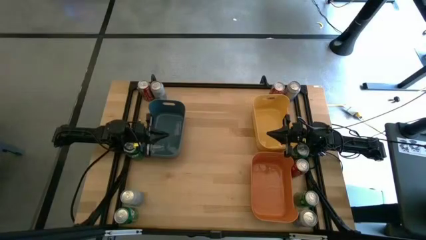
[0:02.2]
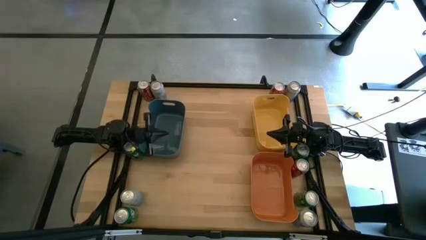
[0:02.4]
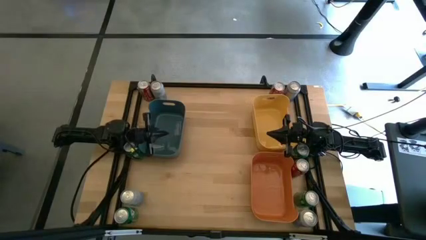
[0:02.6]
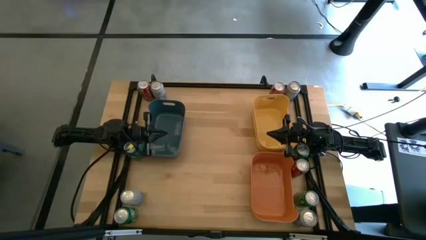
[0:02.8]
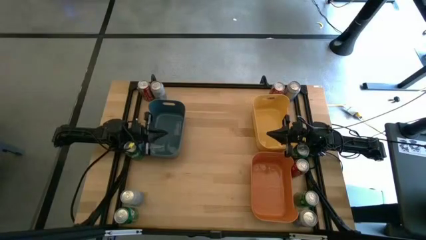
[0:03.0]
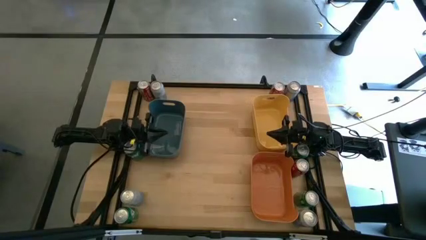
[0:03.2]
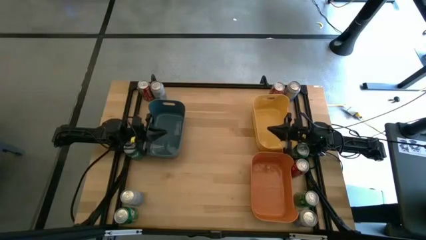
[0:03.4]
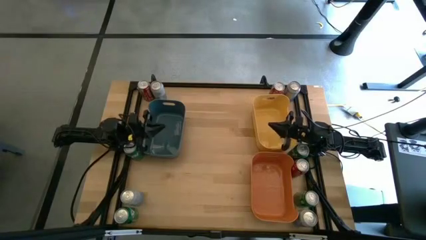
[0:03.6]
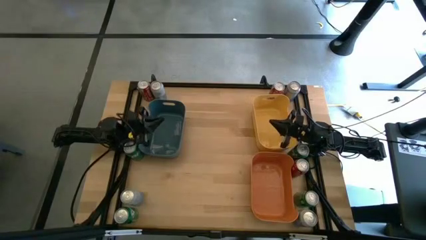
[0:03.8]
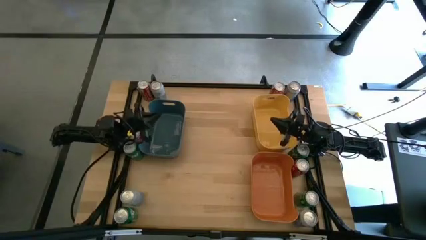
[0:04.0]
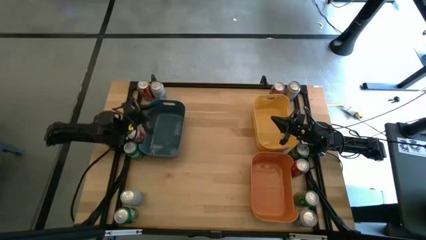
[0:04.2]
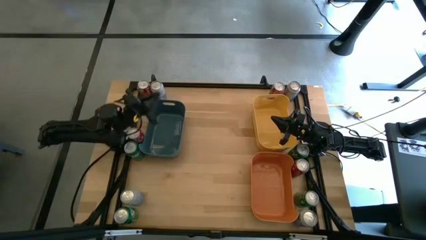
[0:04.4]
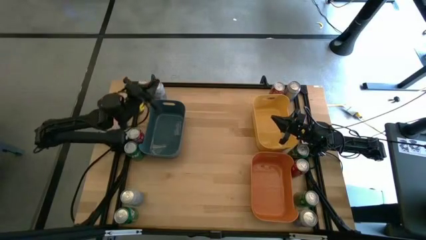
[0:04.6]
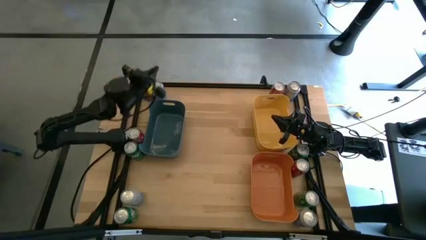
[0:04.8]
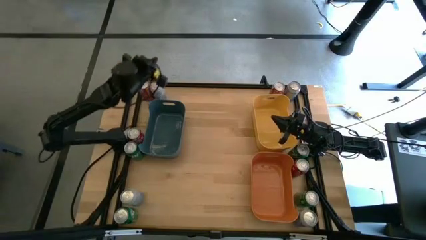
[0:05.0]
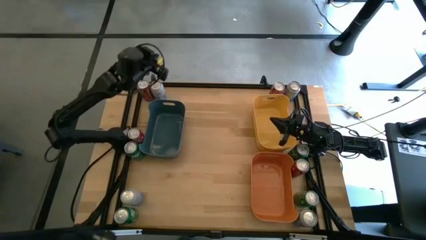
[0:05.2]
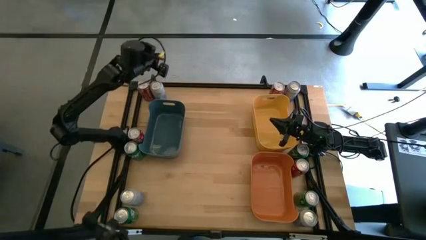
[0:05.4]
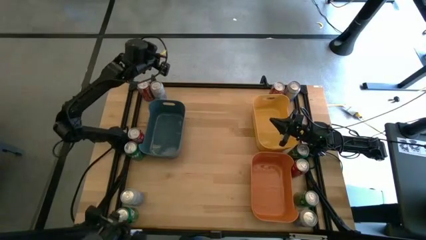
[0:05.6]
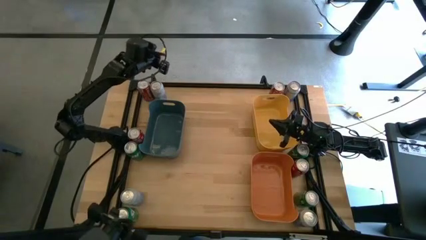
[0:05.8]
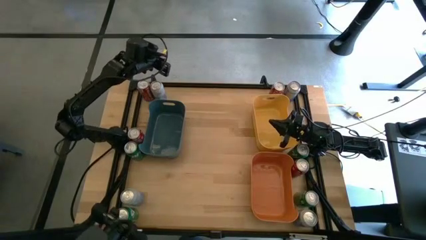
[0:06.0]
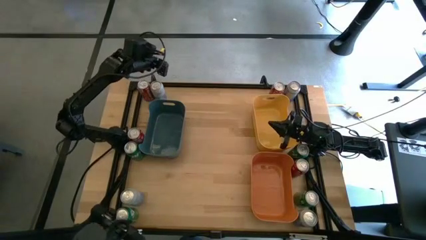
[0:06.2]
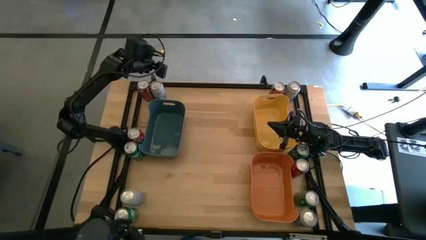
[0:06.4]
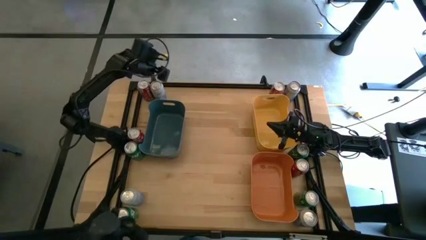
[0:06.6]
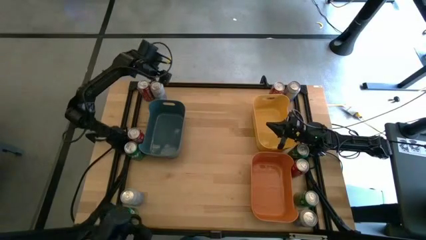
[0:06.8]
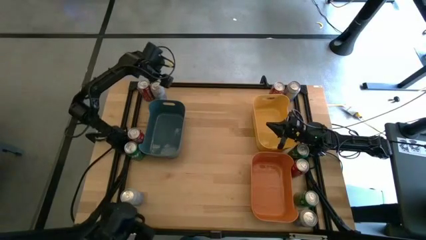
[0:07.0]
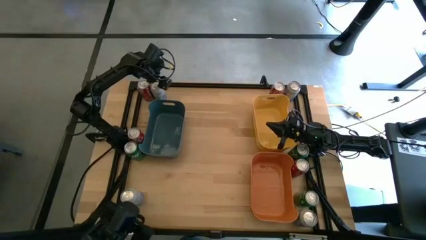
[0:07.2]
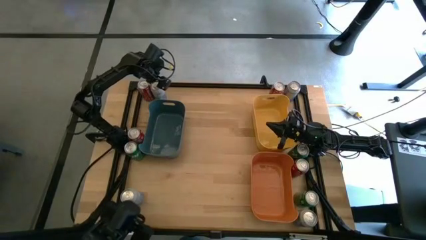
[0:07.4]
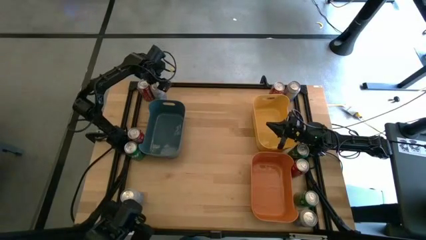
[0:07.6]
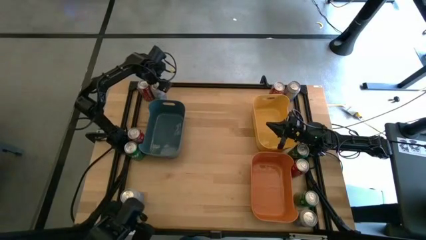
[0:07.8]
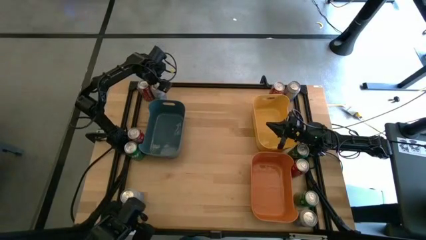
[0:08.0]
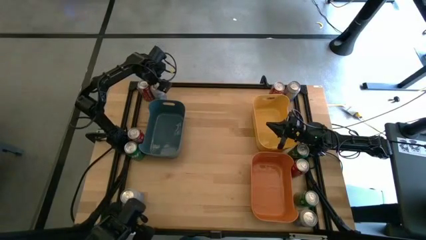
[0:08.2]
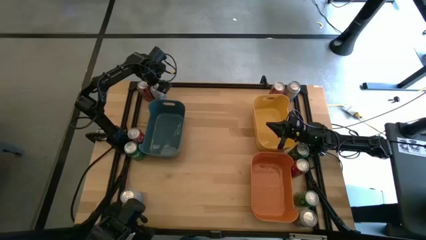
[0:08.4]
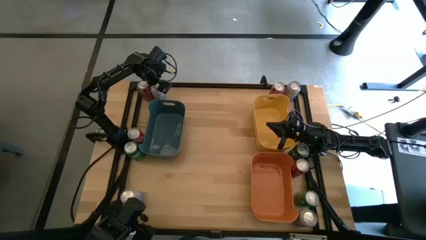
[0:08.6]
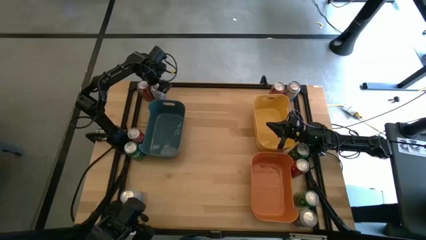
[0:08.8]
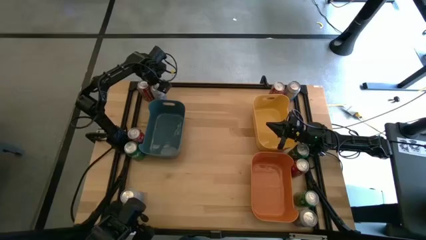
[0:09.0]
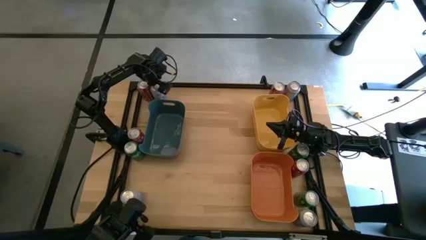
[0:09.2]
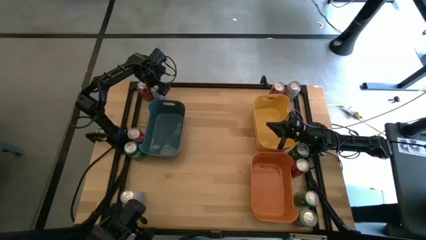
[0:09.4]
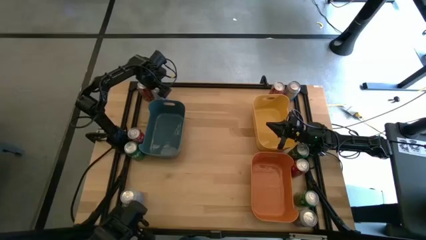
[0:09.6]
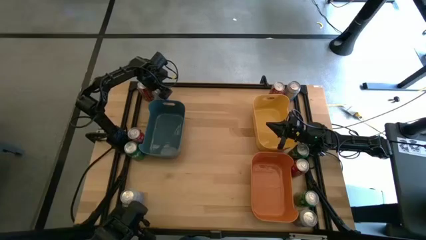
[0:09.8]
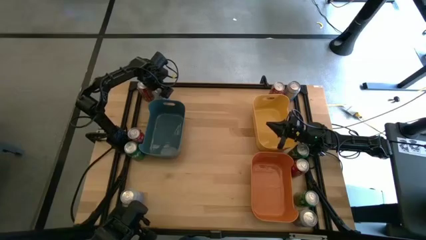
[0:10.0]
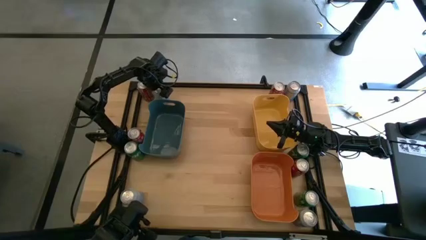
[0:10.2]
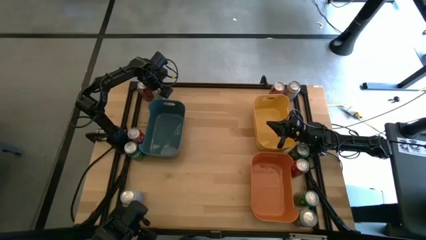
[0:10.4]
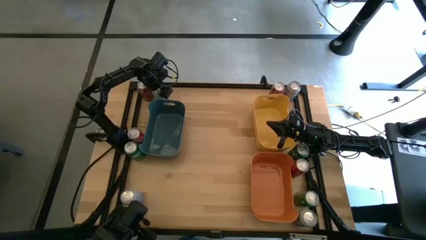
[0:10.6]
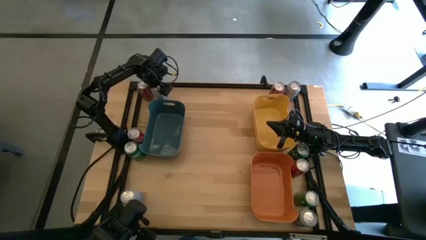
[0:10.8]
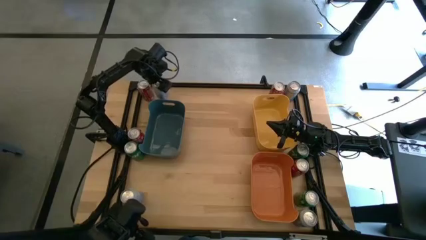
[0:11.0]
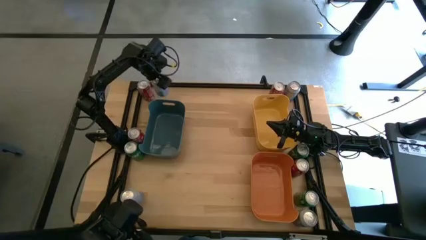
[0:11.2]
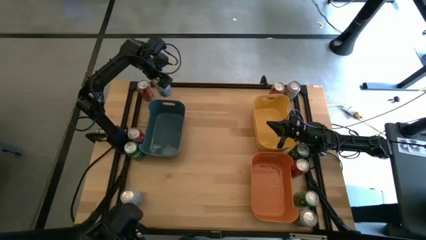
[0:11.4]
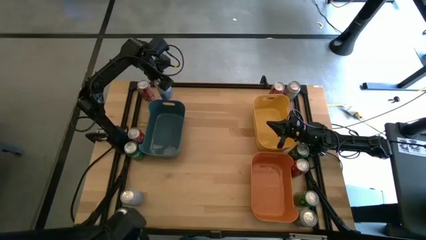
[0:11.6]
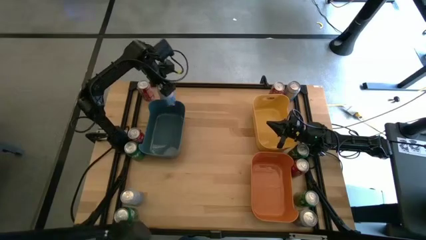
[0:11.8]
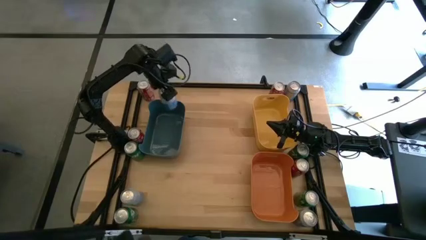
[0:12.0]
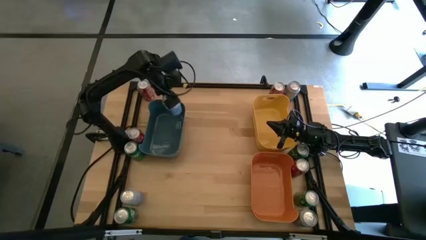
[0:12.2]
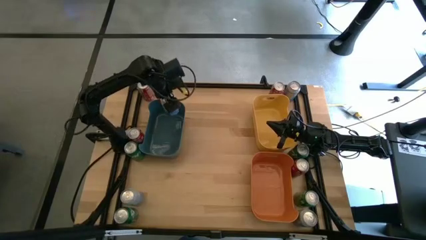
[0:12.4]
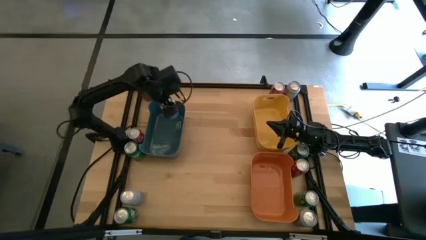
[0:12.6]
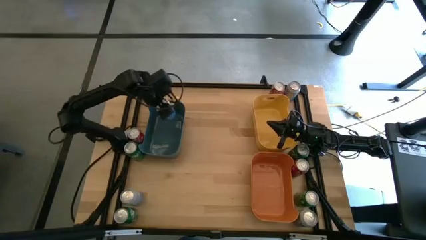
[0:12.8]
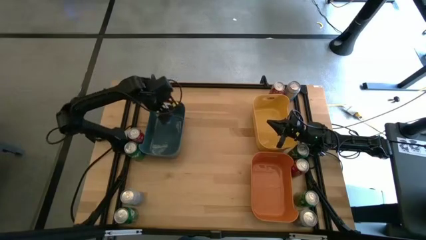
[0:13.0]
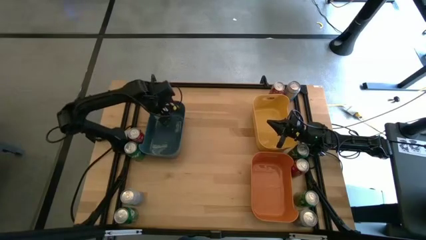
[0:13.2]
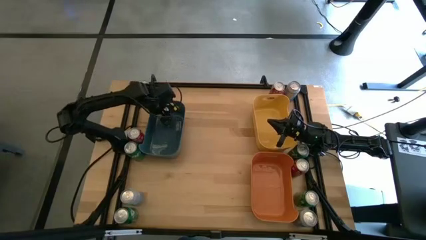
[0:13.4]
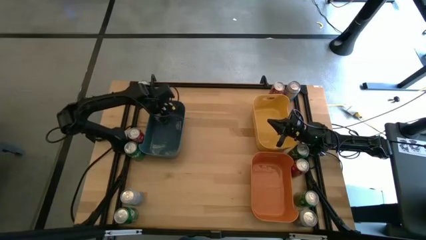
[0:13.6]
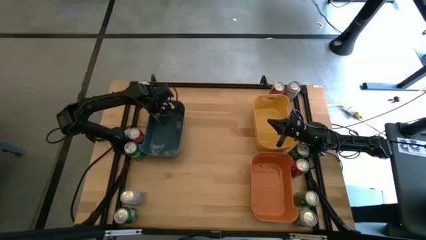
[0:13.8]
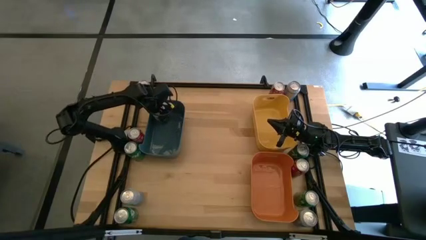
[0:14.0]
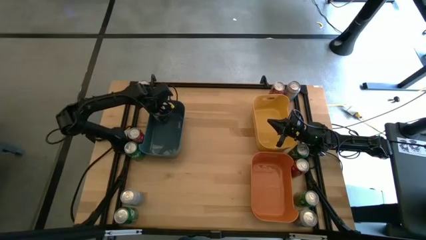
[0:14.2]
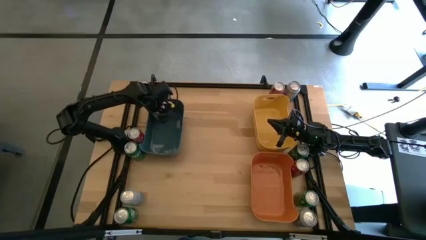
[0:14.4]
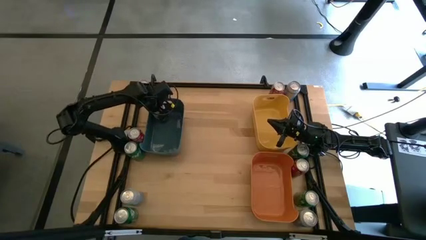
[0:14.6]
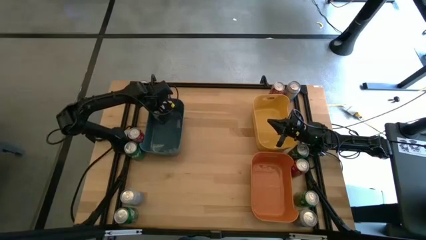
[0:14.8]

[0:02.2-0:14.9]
Task: Sort soda cans
Put the top left blue-white soda can into the blue bin
